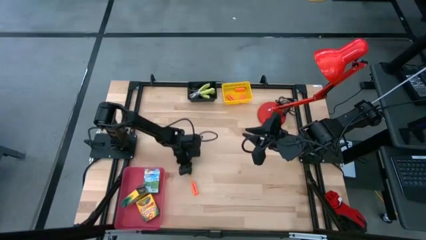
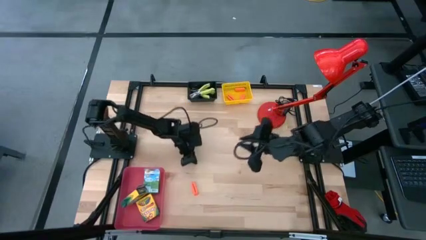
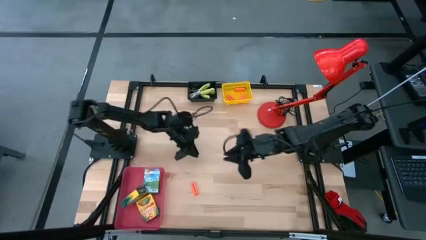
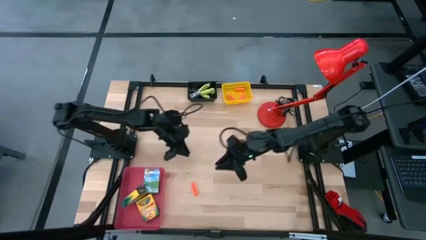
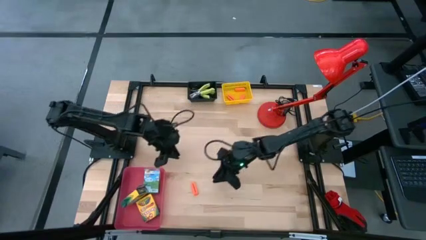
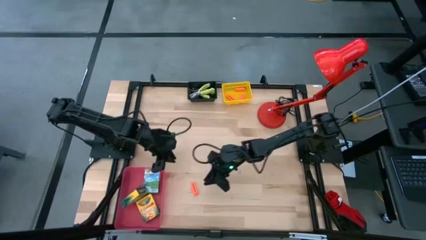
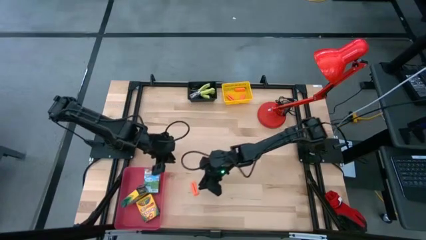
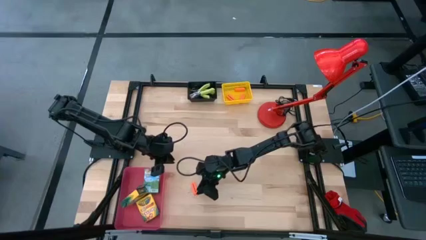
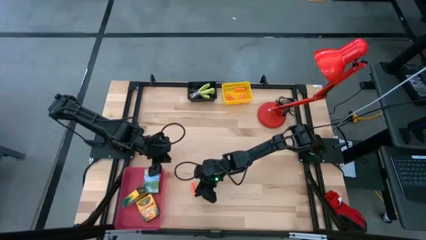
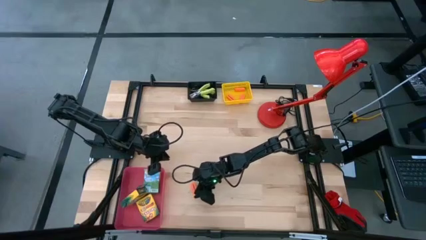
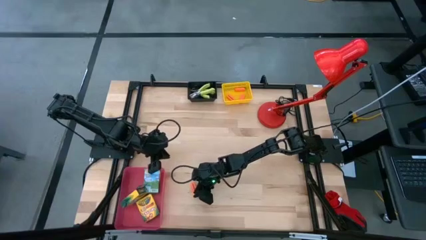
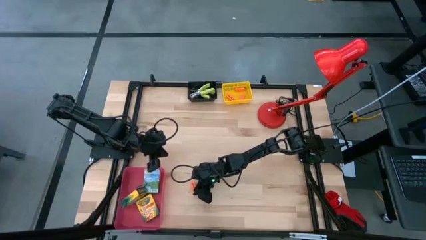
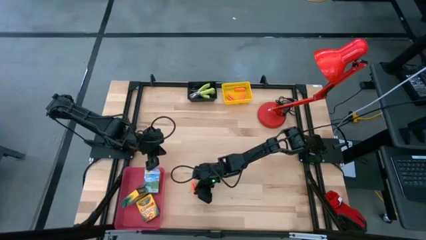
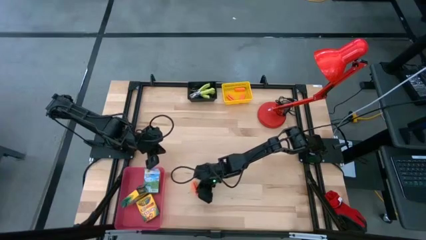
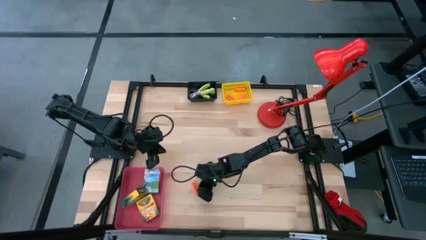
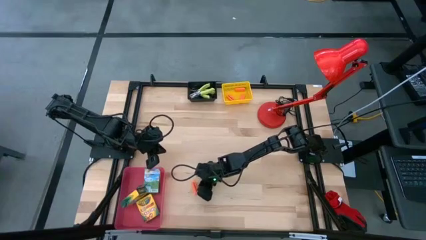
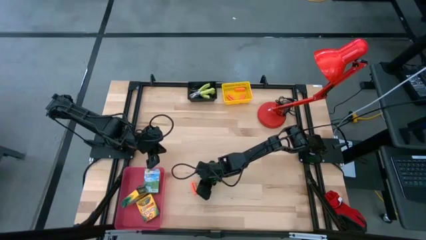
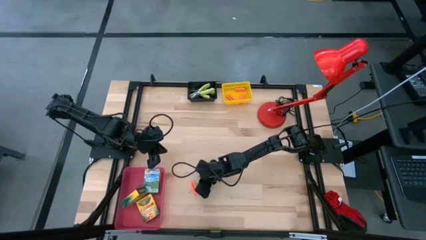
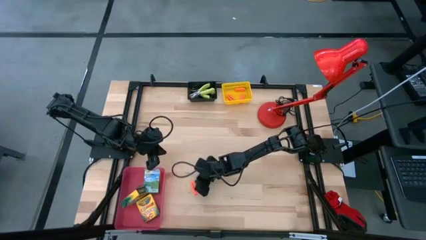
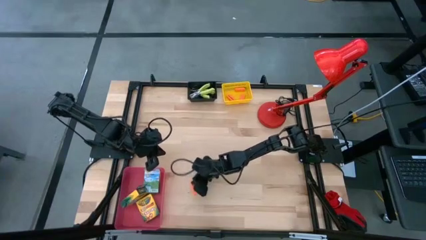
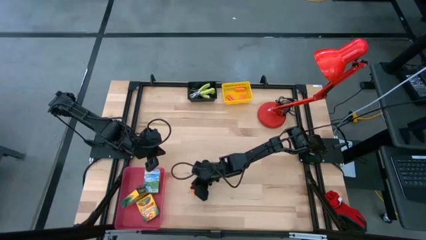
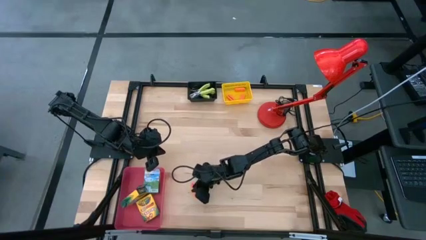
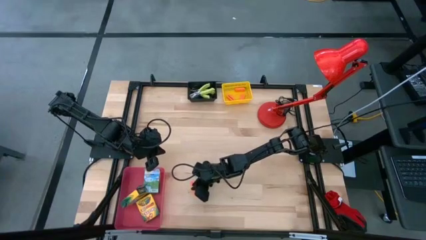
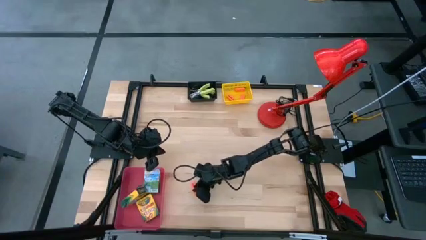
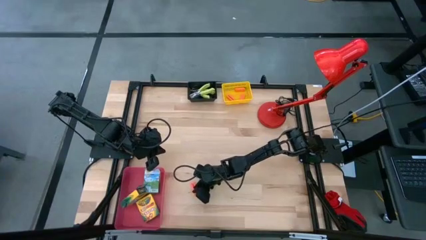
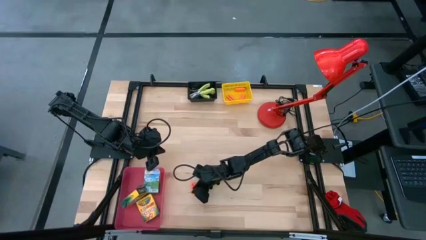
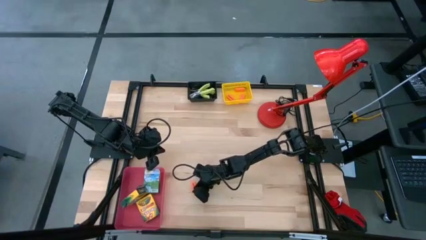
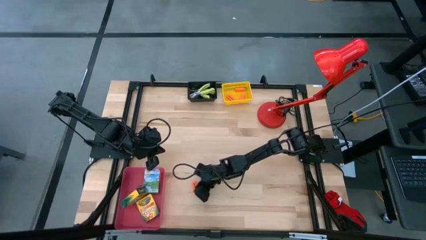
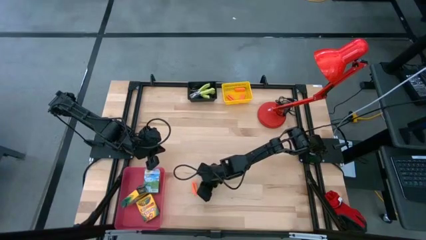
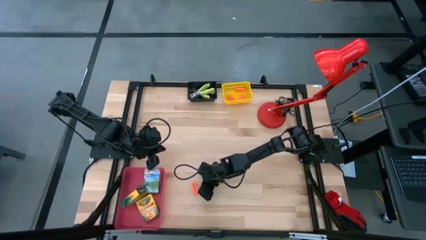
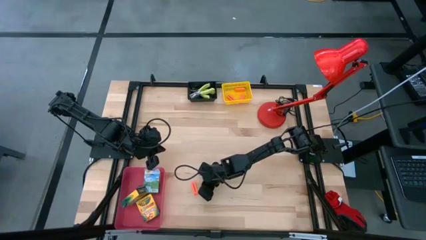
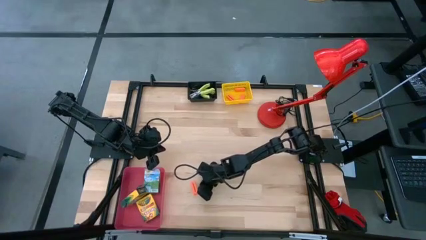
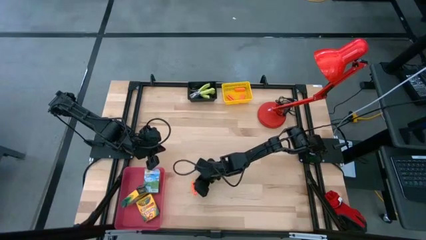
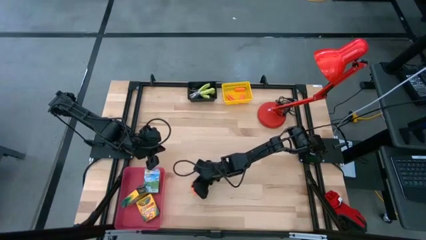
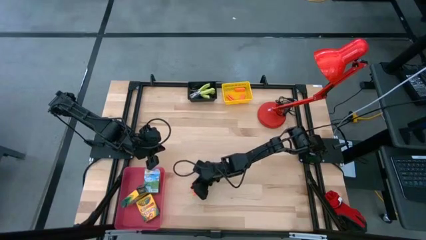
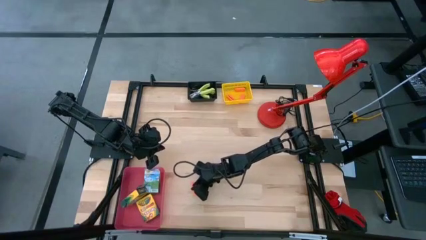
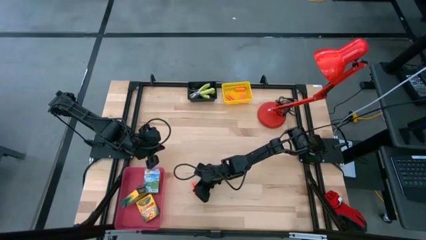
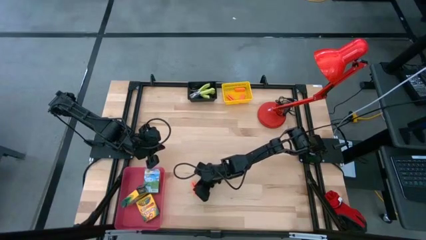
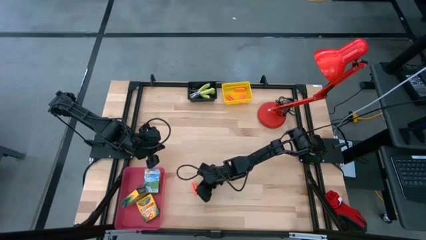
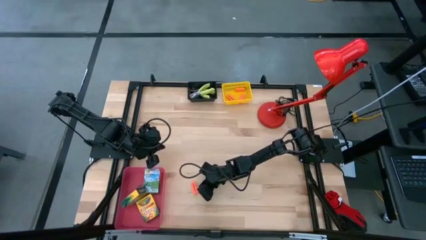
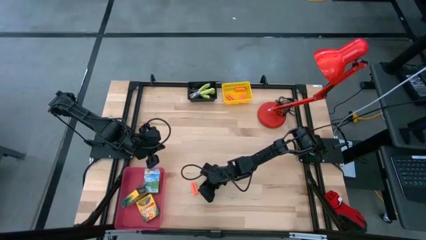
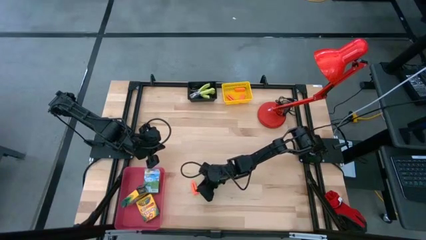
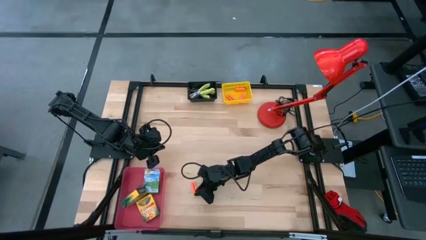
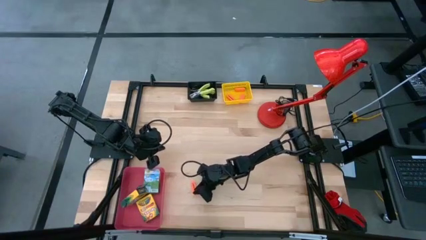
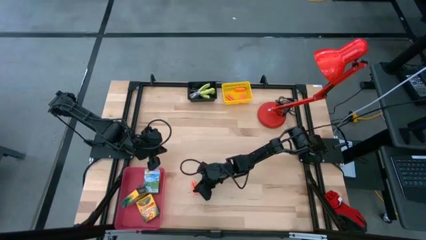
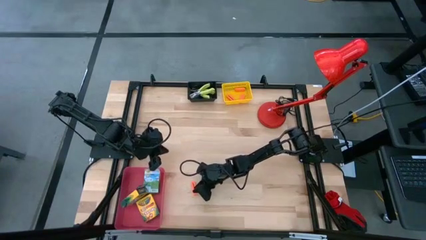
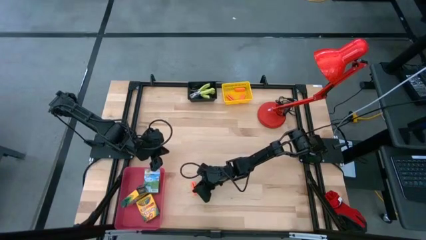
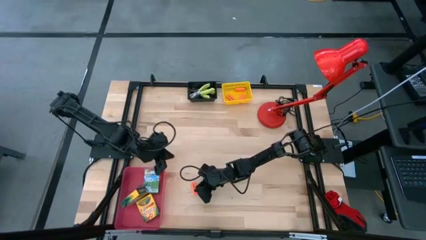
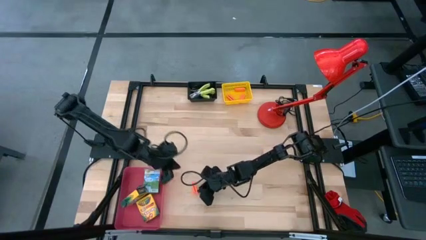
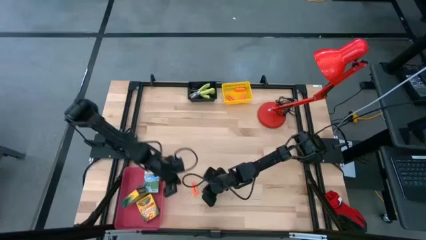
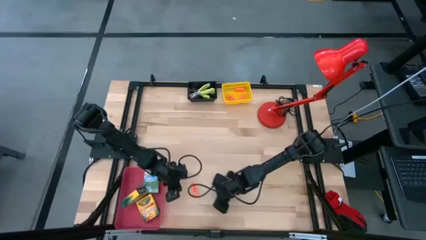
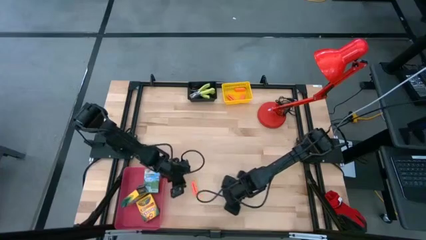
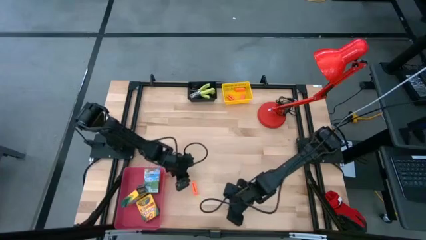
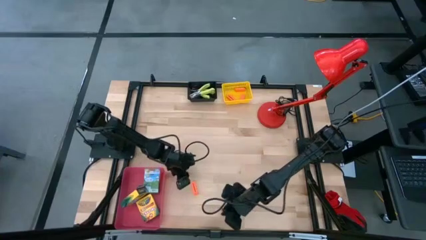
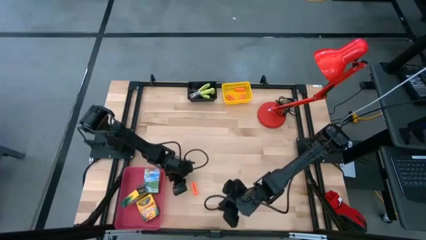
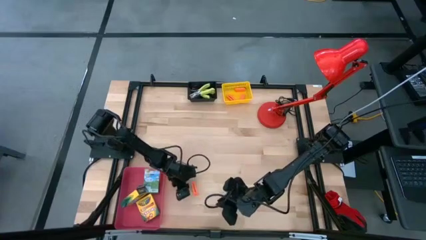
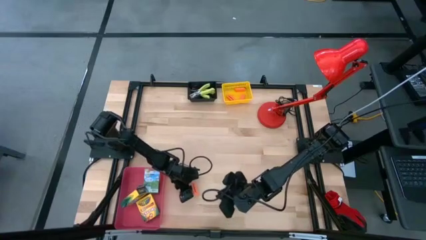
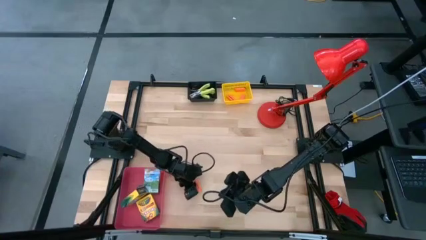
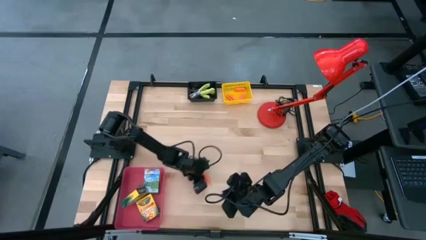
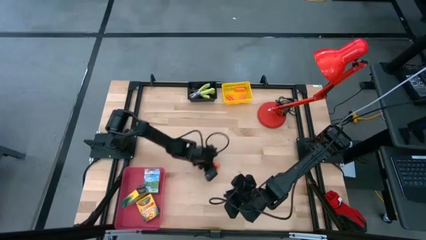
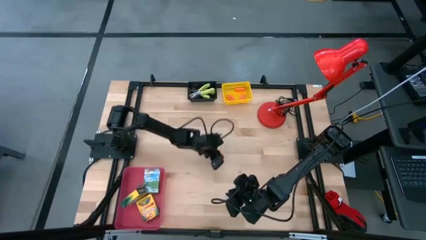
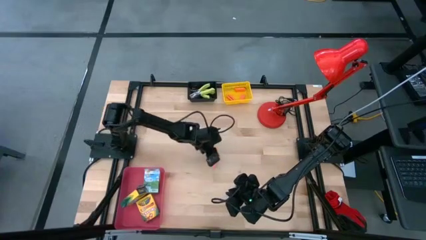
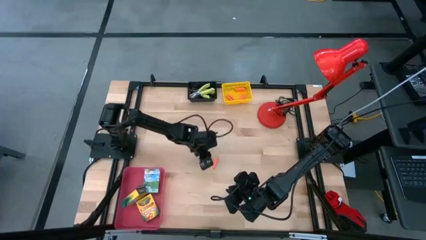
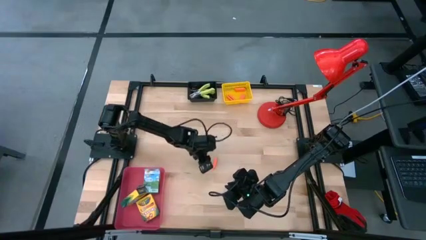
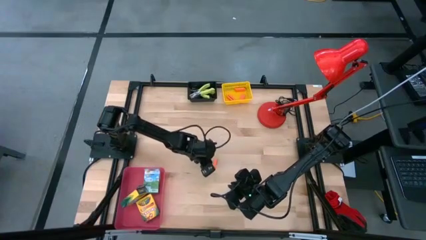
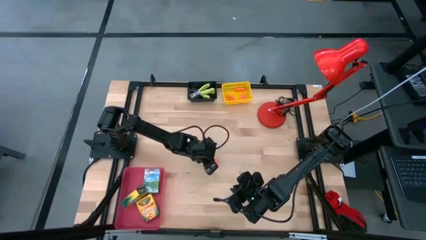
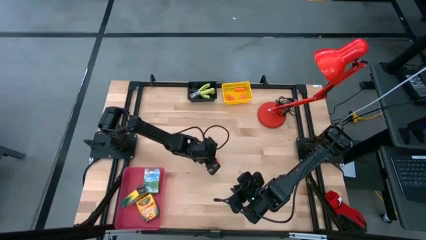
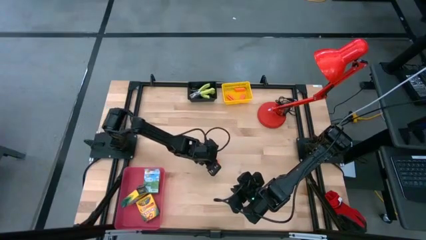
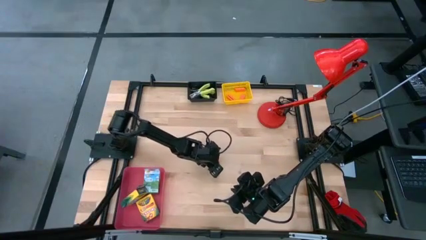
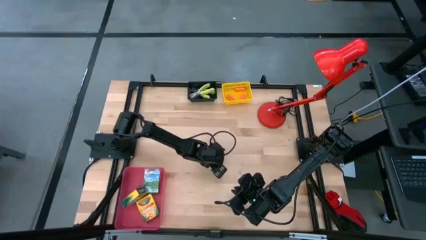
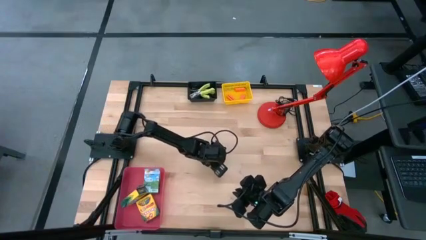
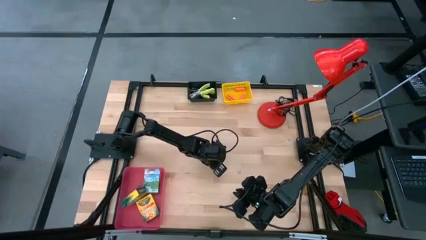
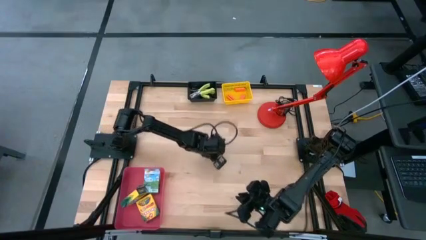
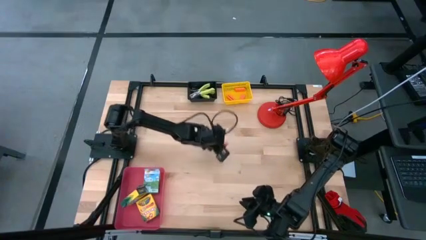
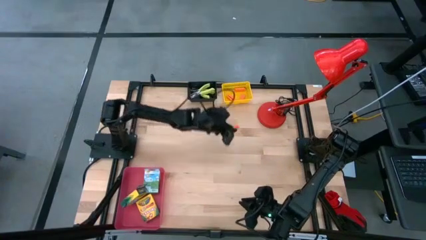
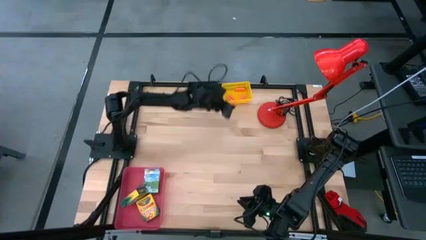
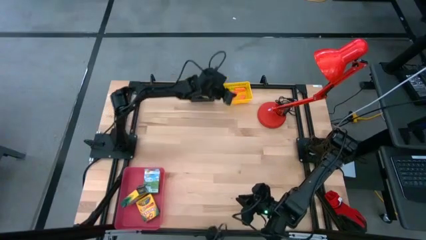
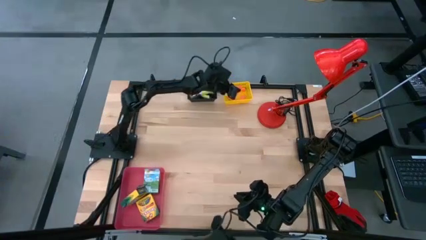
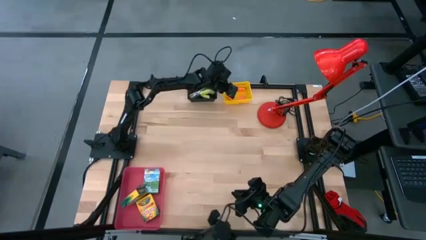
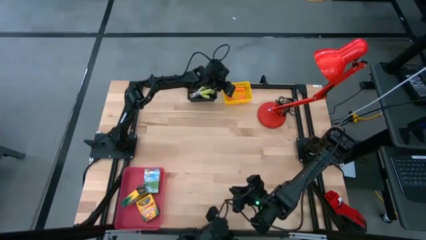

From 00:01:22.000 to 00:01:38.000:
Task: Pick & Place School Supplies
Put the orange eraser into the yellow bin

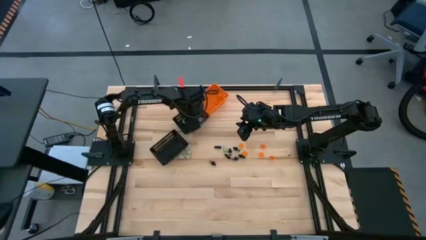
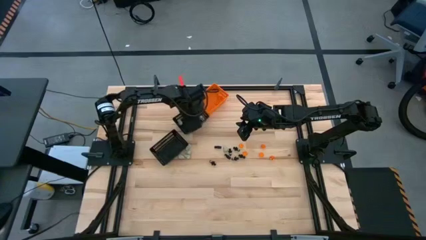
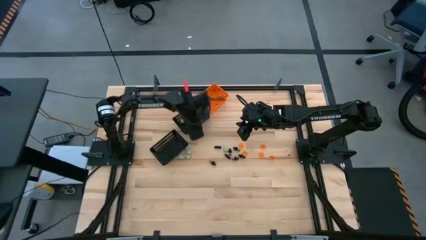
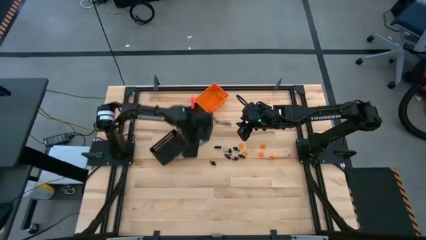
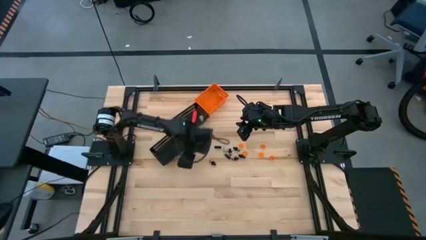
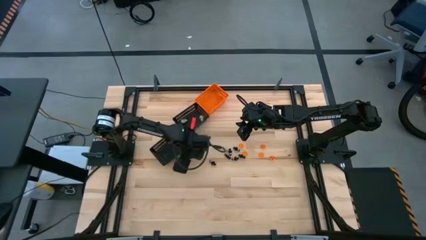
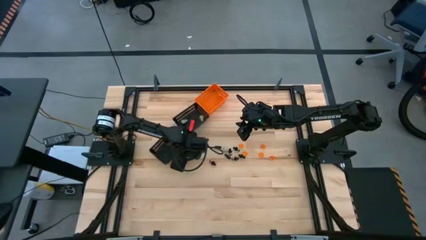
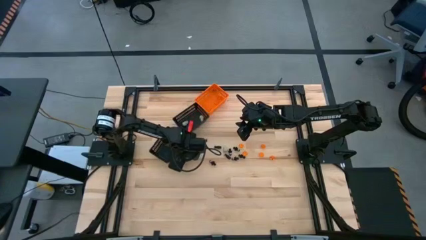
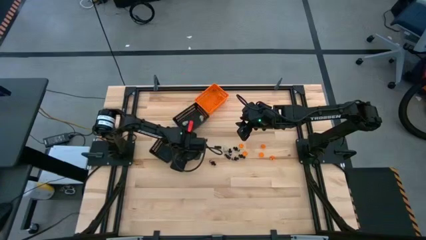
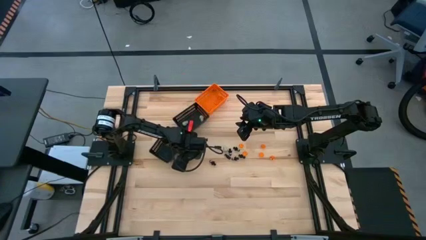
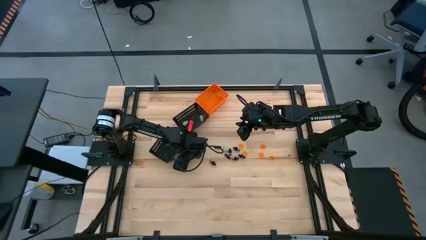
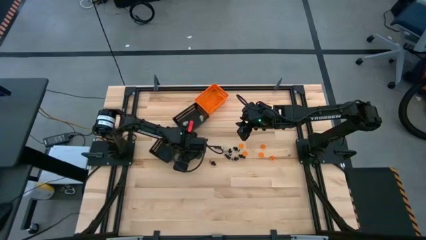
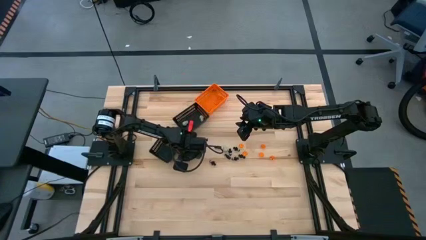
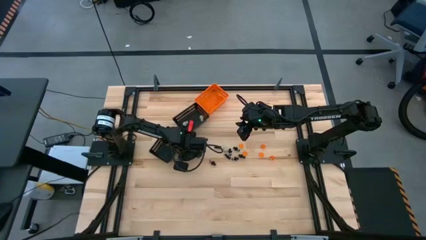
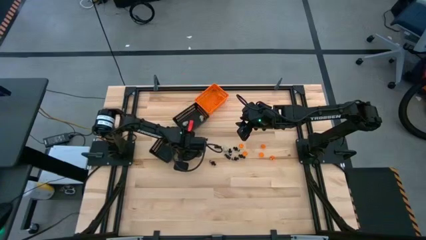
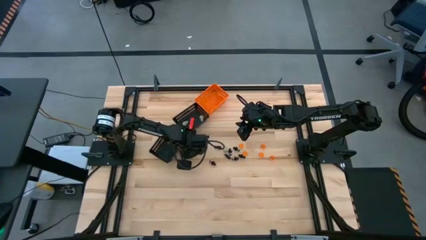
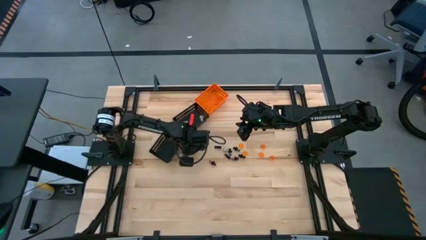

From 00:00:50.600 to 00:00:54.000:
Task: Sort Halloween decoration
Put the white skull toy into the top black bin
